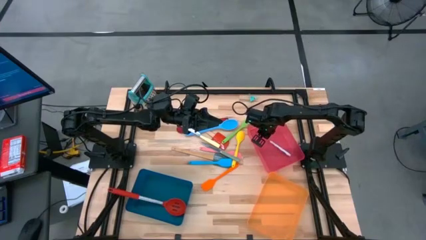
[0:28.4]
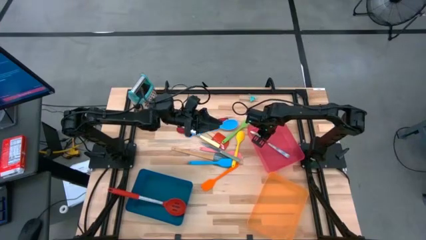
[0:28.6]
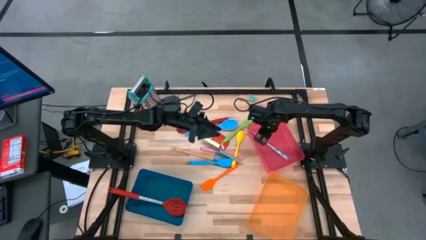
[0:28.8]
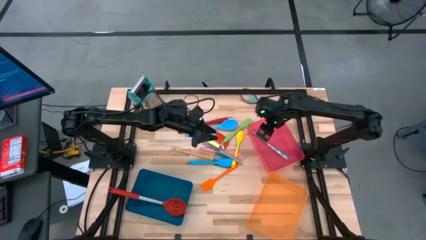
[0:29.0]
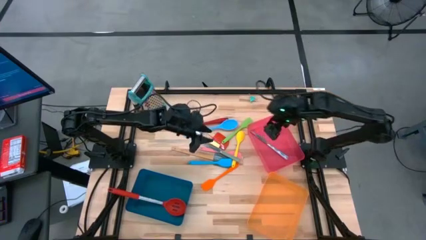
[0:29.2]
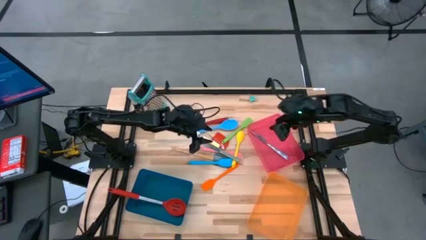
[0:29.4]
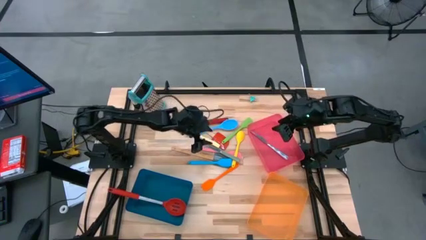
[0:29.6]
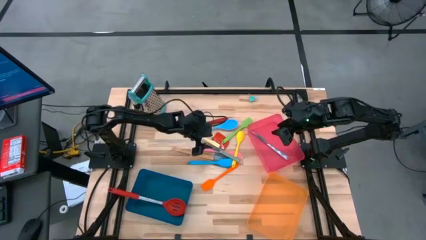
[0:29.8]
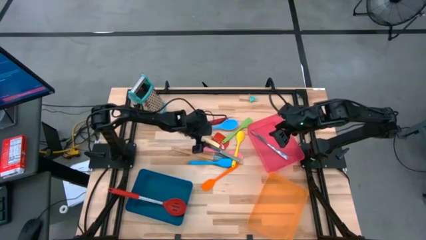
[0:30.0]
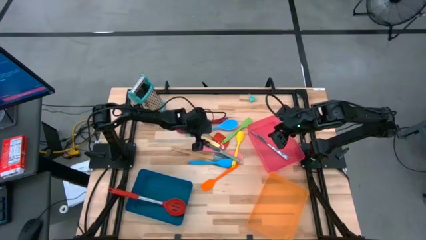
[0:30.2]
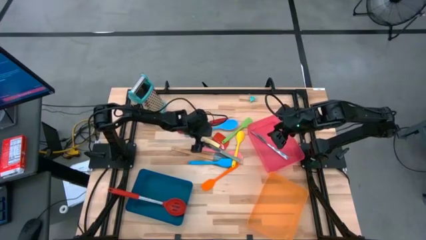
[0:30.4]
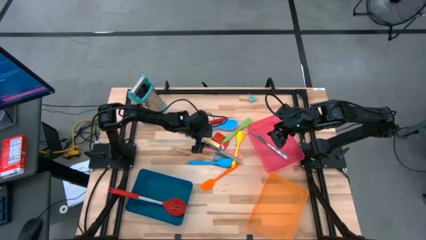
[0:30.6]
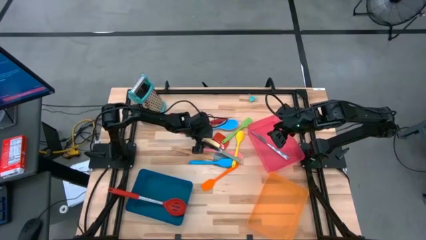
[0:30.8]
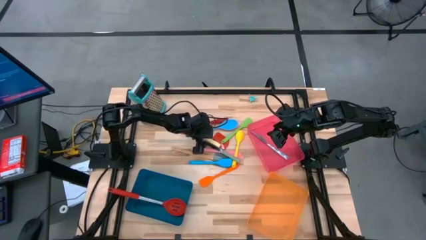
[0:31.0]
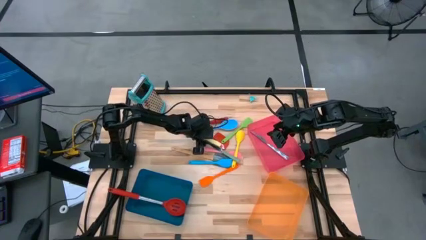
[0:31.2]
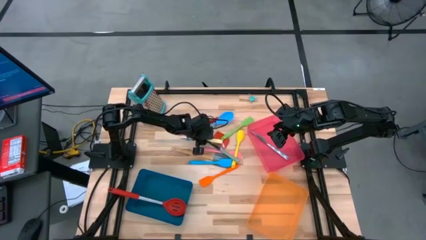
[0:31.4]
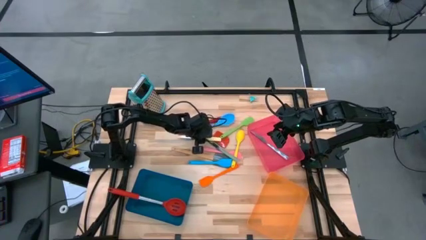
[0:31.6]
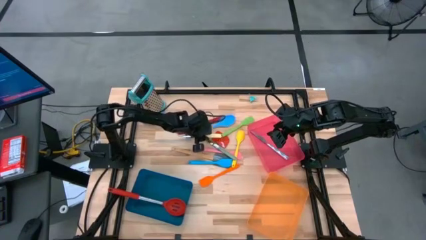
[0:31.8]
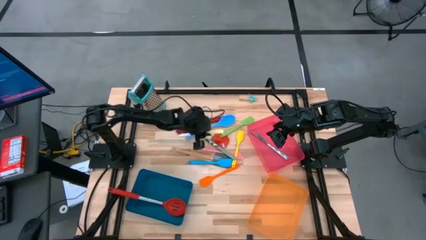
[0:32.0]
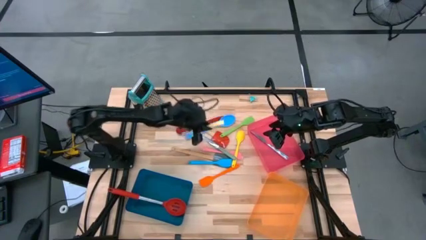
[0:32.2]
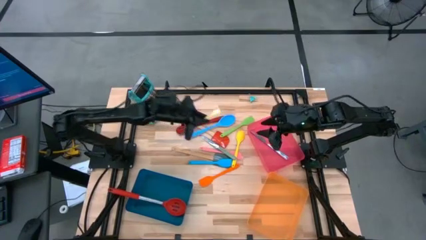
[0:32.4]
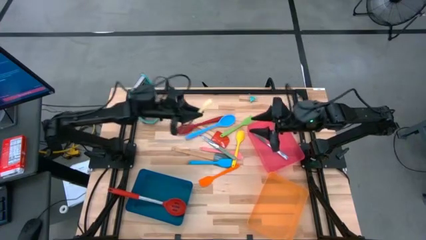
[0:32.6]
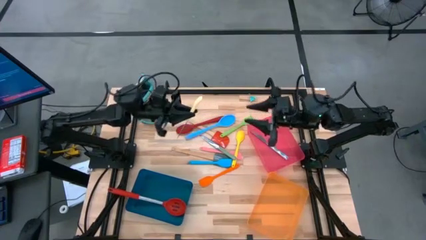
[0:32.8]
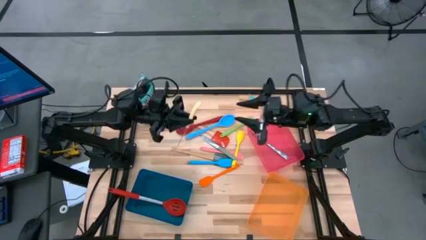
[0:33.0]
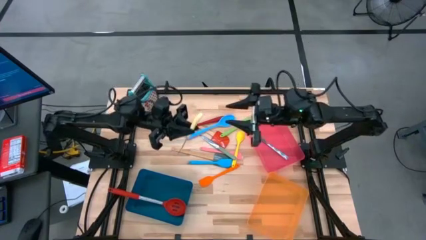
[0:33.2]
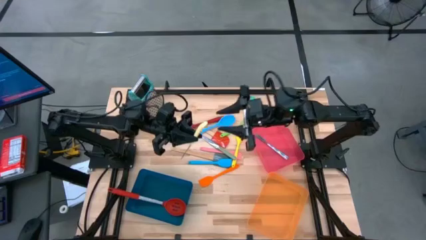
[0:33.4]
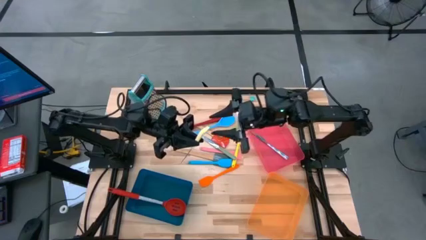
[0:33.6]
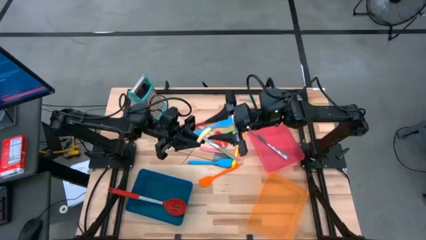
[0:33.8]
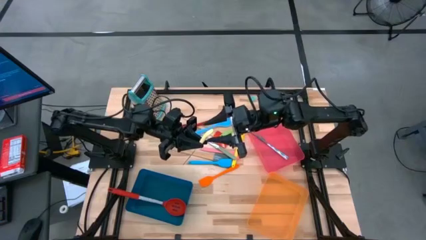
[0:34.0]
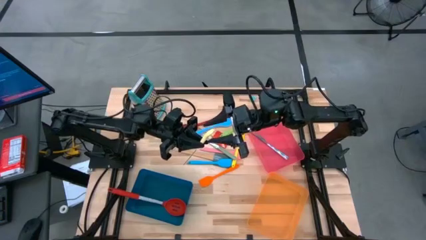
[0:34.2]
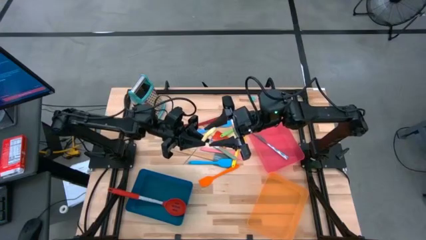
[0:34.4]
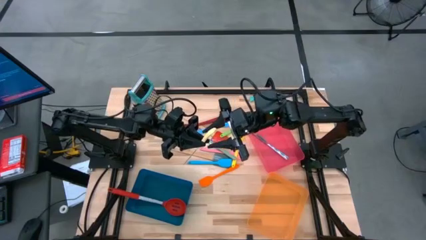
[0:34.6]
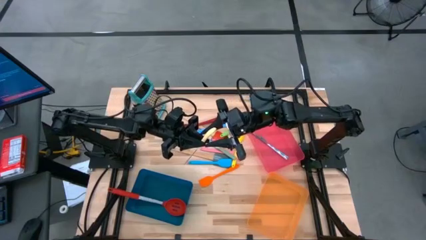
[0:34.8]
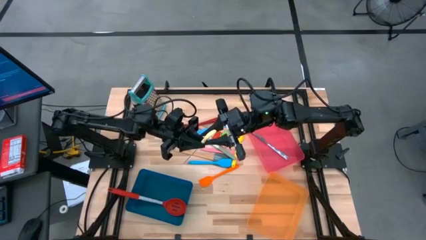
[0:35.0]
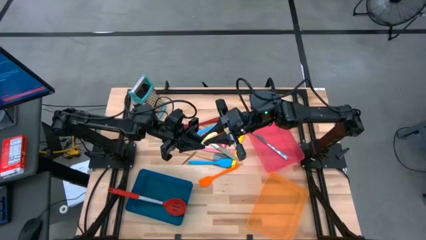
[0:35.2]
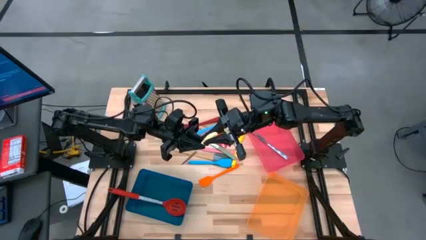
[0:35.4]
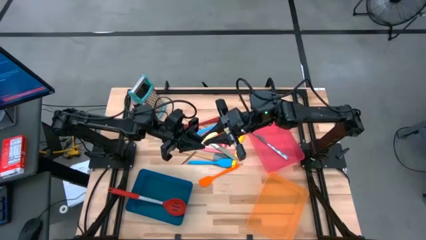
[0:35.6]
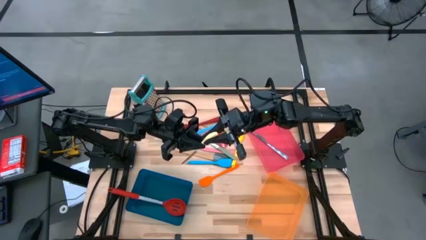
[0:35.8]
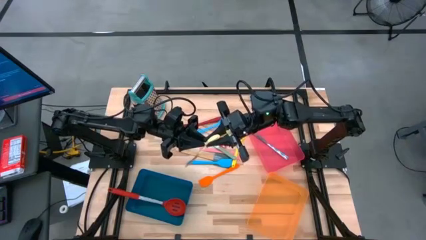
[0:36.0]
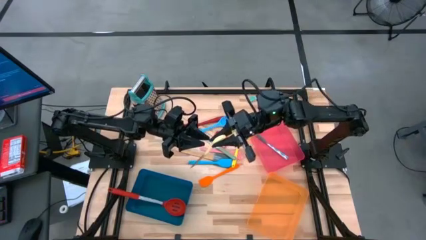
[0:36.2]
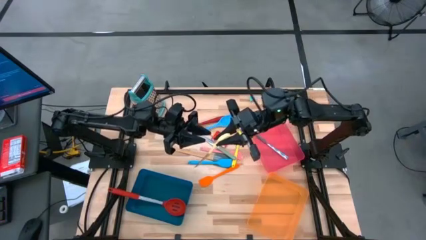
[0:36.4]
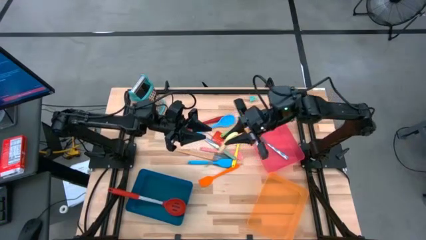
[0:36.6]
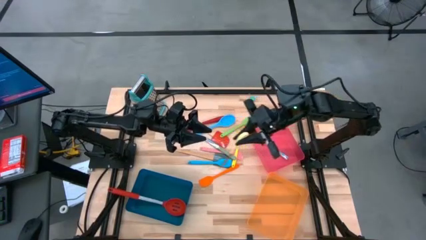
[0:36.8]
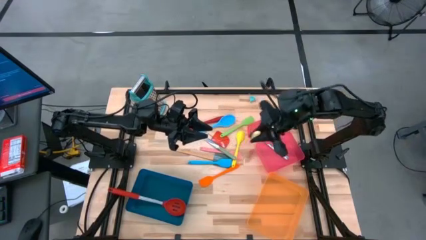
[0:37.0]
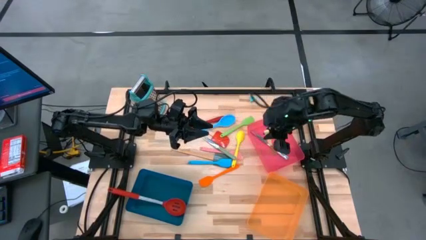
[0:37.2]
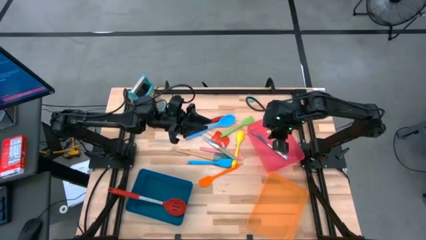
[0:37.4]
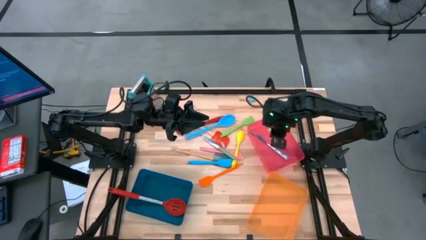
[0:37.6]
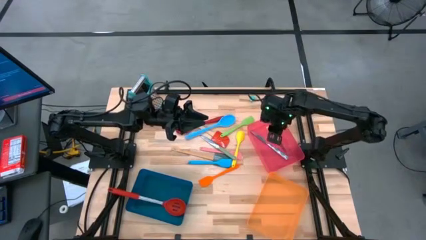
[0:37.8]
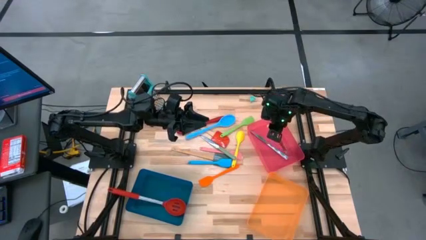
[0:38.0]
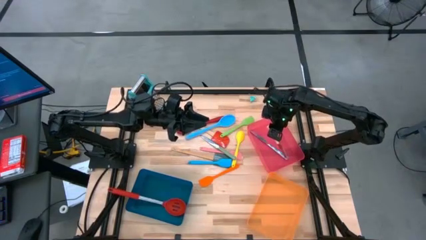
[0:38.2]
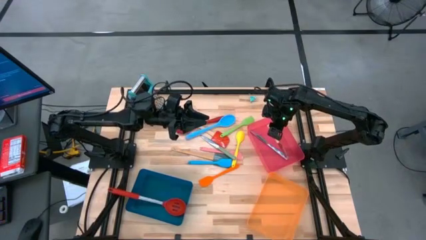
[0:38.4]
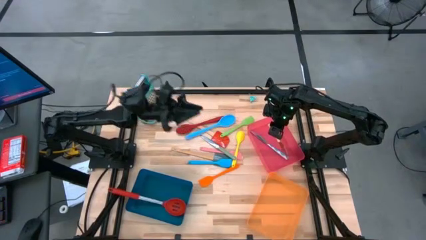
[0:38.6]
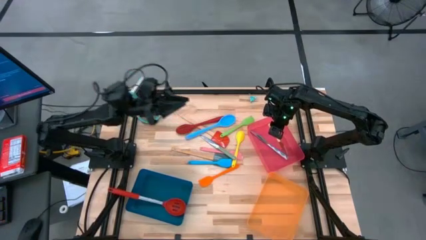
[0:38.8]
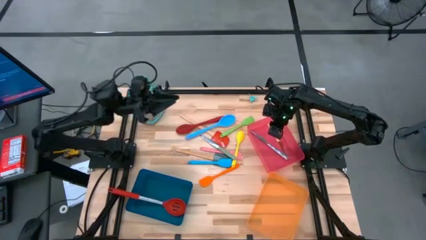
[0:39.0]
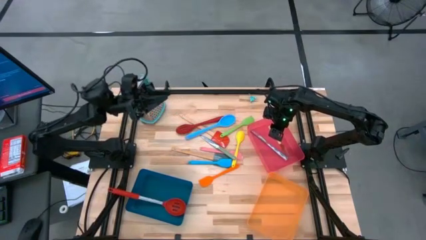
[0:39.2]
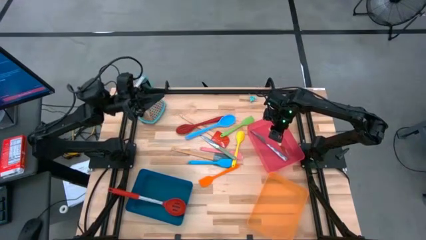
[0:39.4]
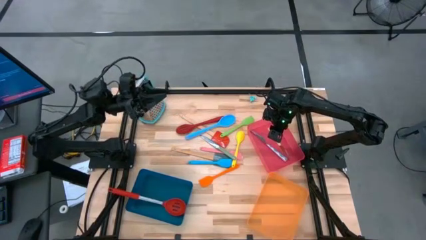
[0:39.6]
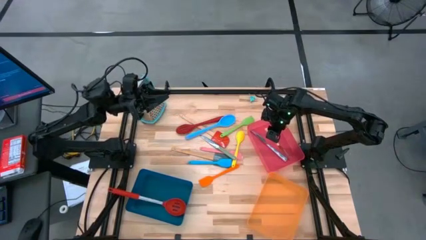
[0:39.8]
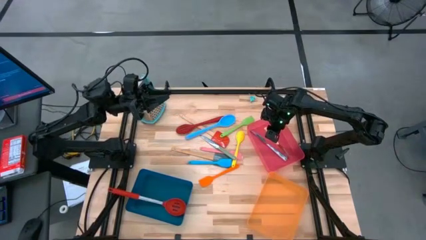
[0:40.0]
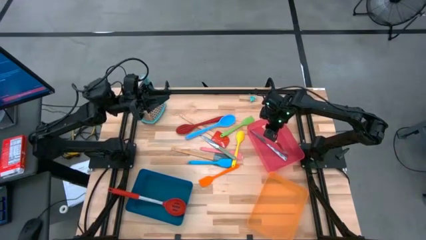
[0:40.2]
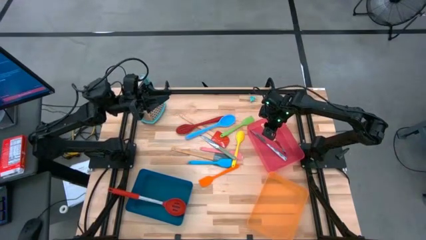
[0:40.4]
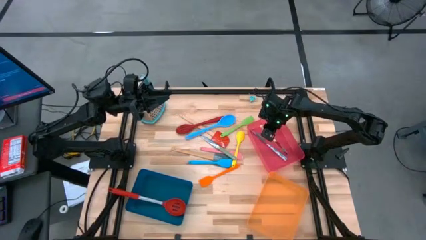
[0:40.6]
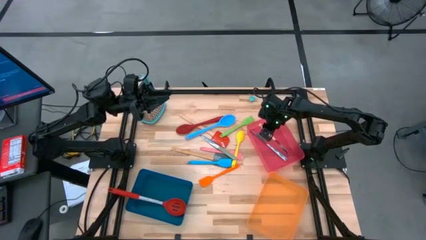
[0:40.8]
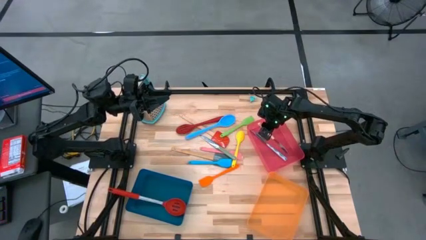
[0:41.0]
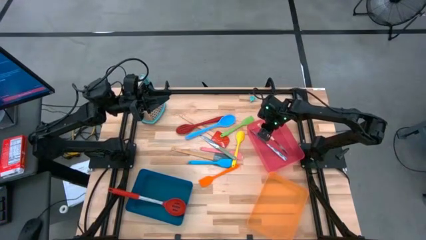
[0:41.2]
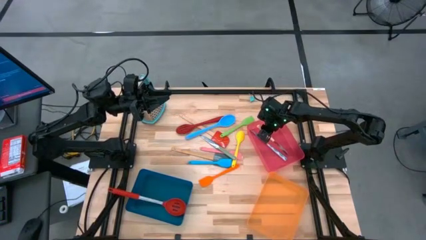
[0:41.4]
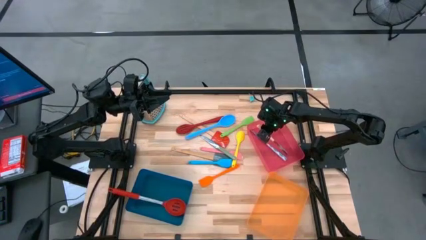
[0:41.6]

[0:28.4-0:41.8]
Task: Pick & Place Kitchen Items
Put the yellow table knife into the red bin
